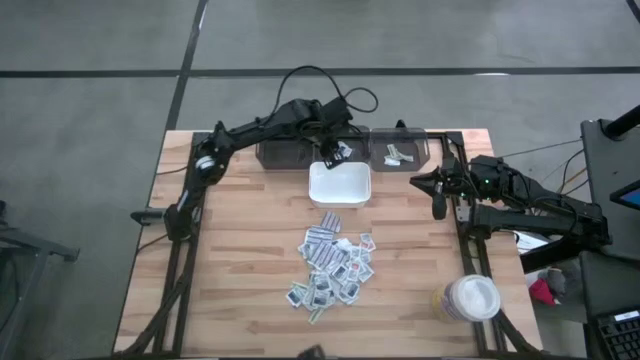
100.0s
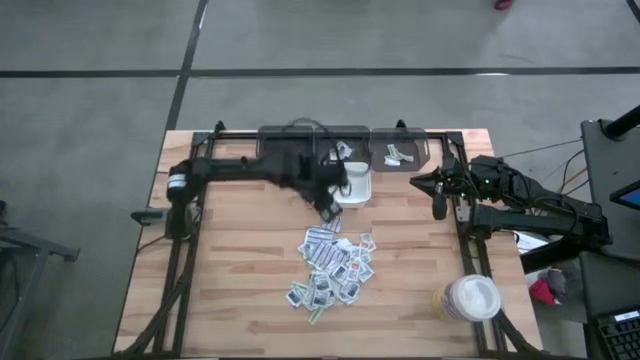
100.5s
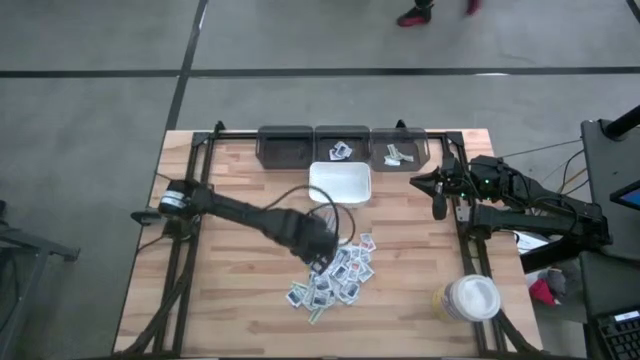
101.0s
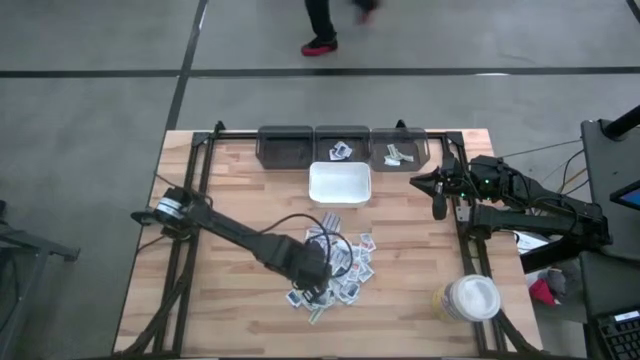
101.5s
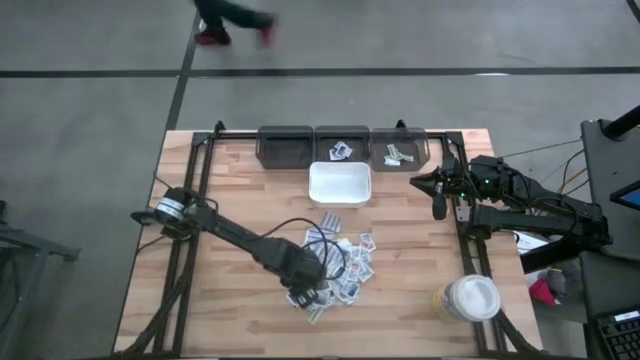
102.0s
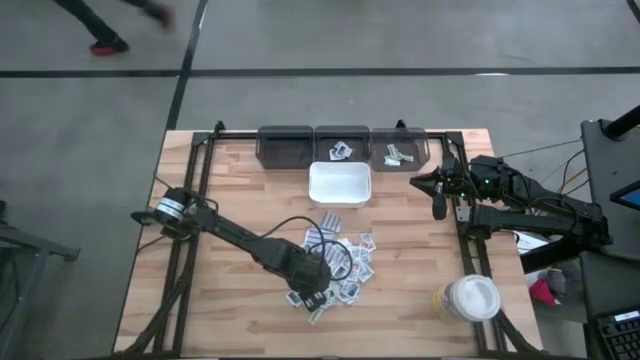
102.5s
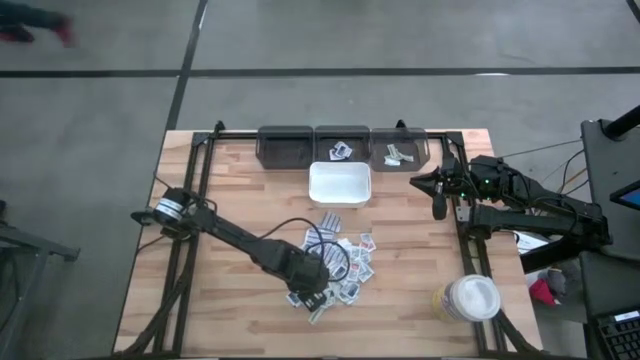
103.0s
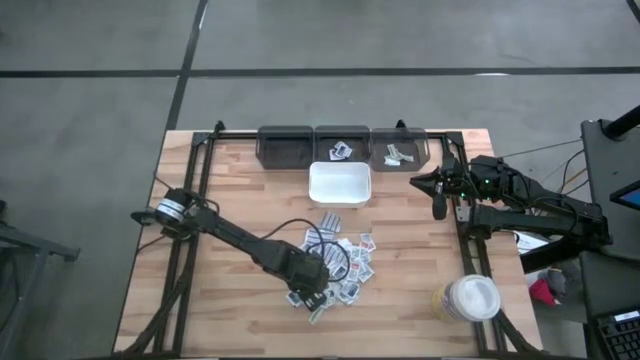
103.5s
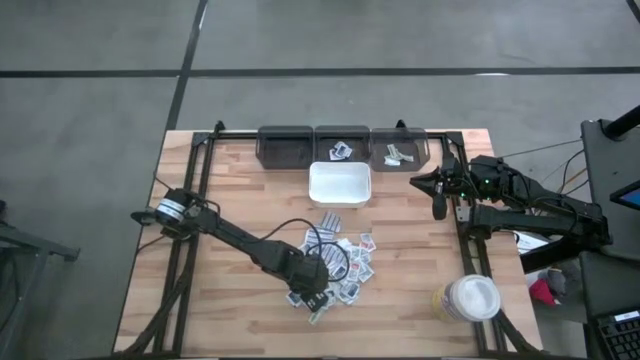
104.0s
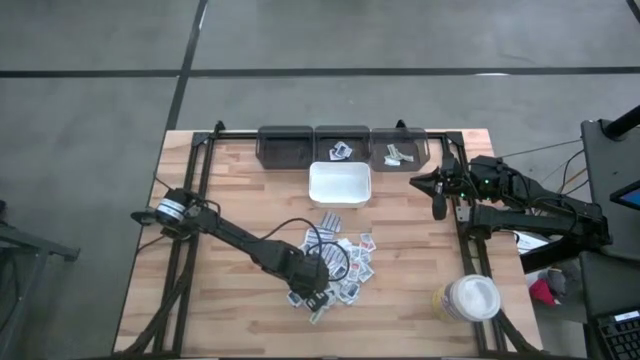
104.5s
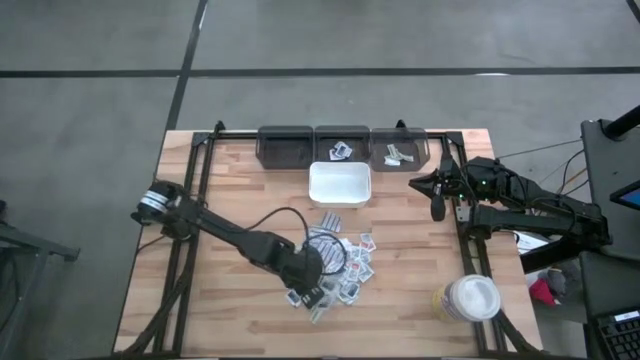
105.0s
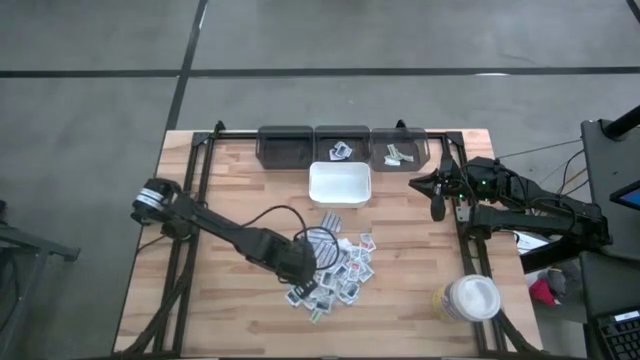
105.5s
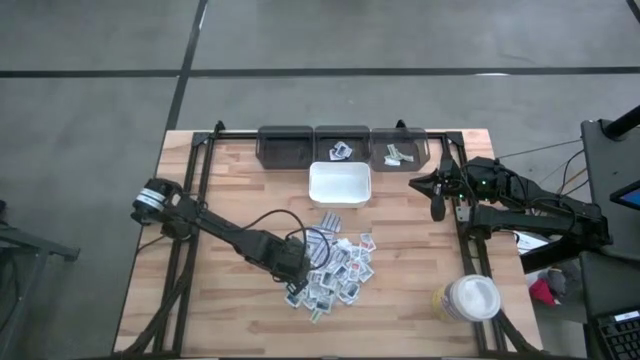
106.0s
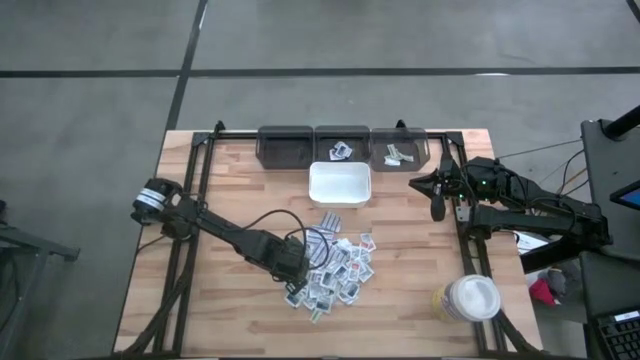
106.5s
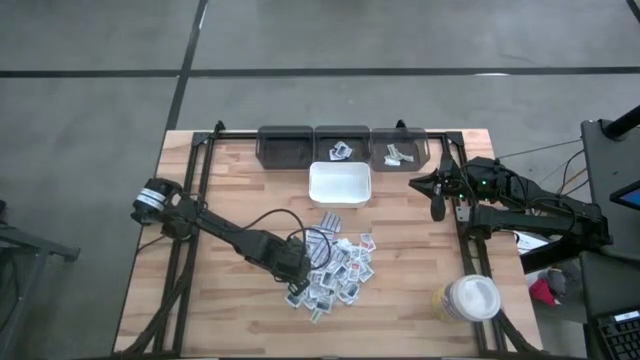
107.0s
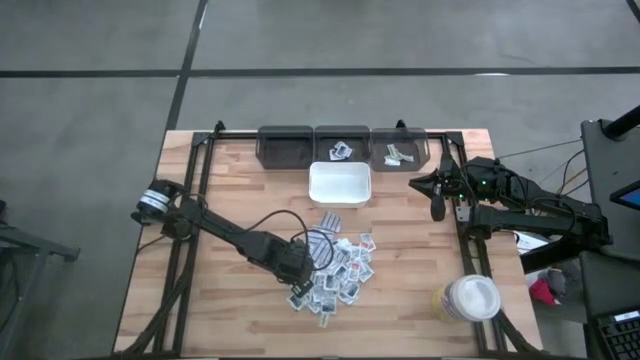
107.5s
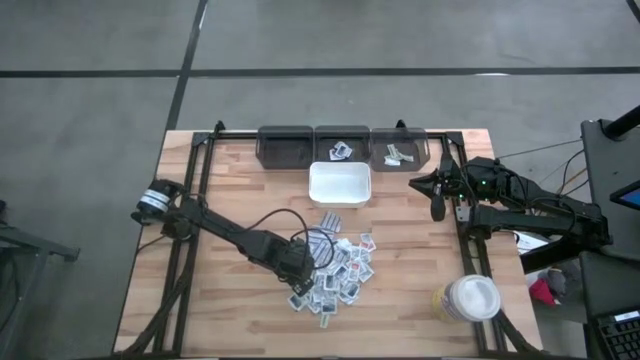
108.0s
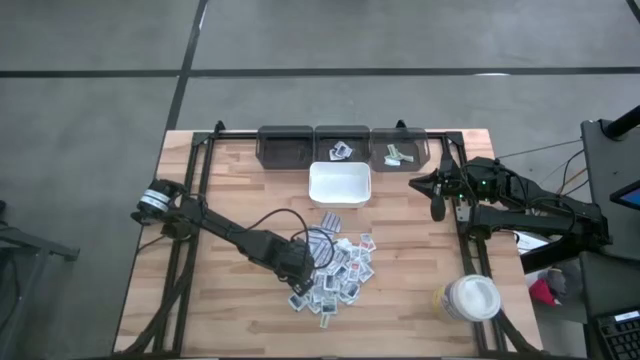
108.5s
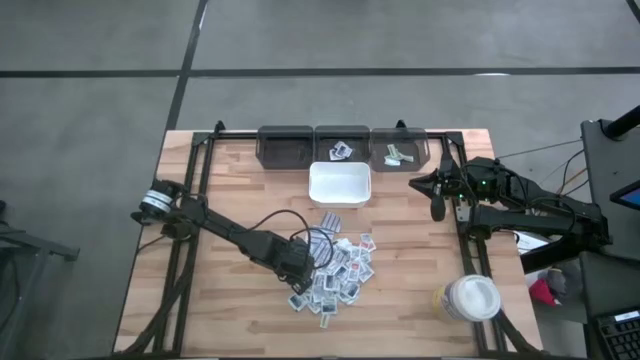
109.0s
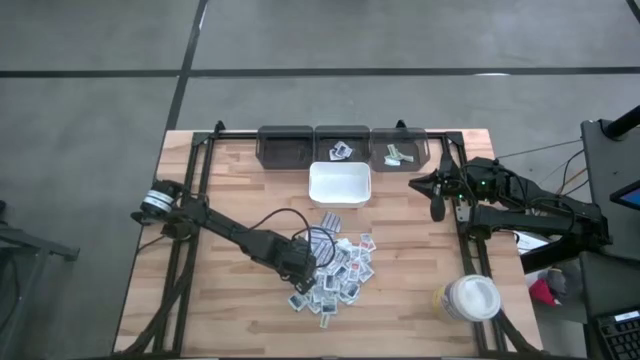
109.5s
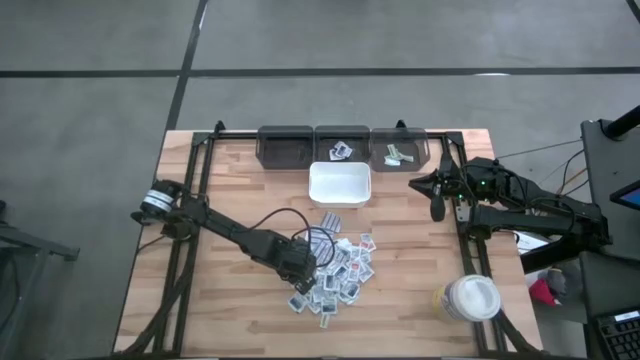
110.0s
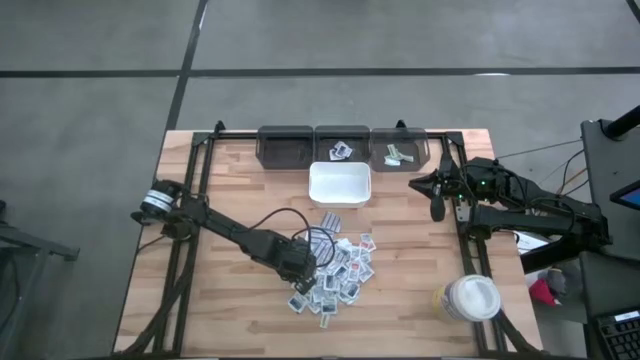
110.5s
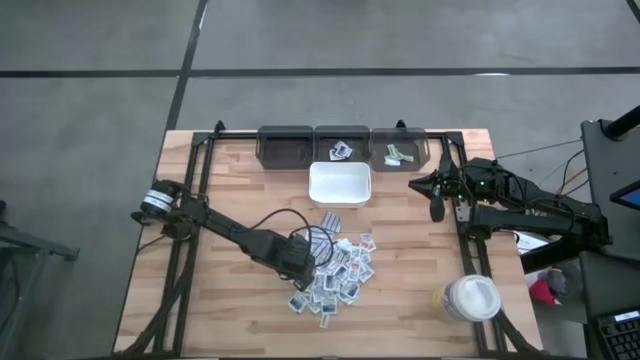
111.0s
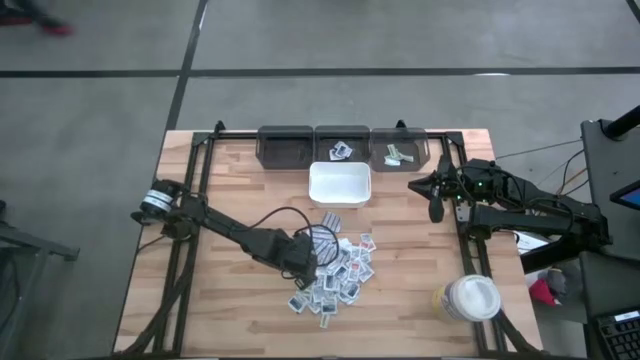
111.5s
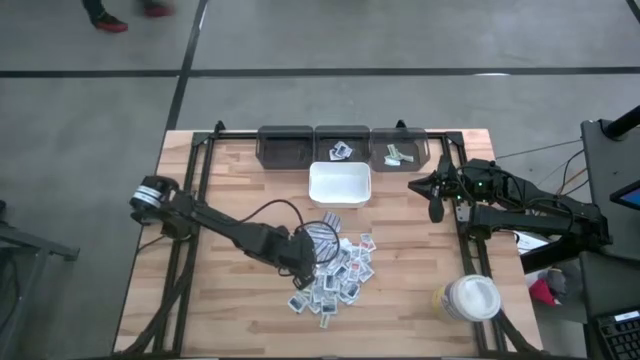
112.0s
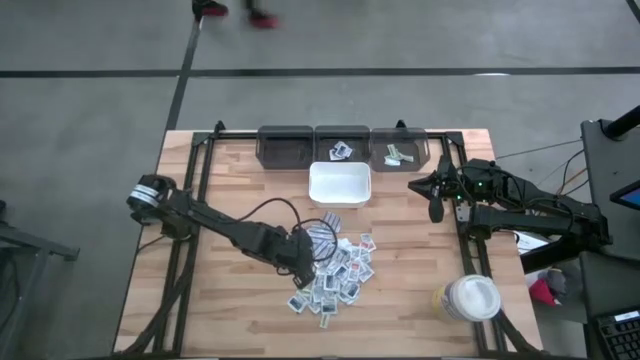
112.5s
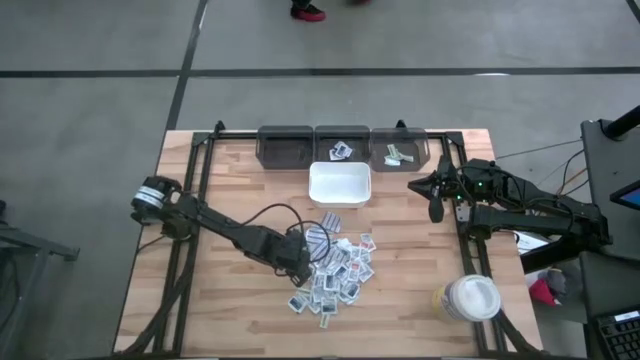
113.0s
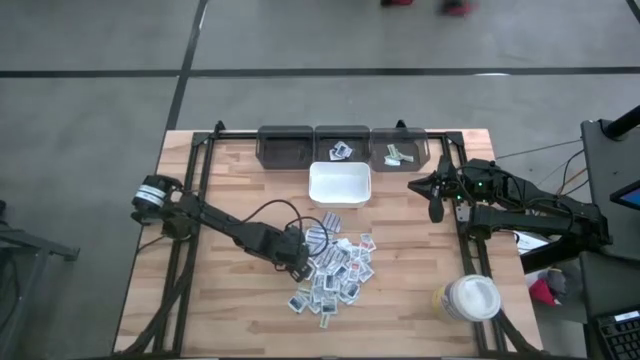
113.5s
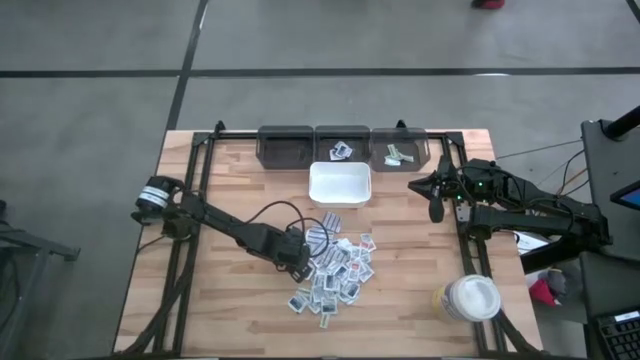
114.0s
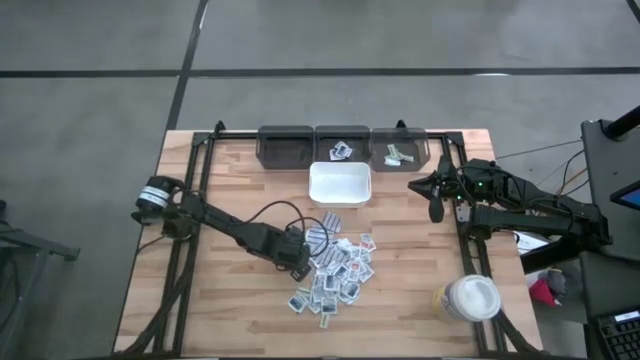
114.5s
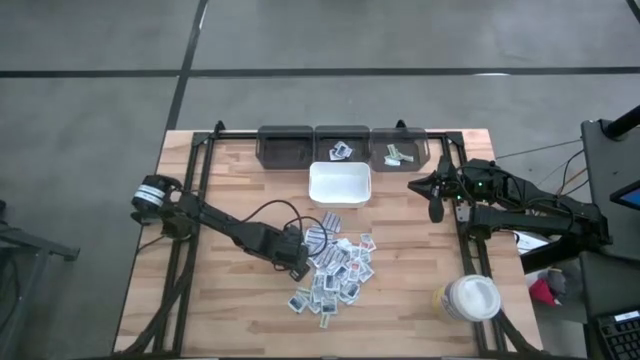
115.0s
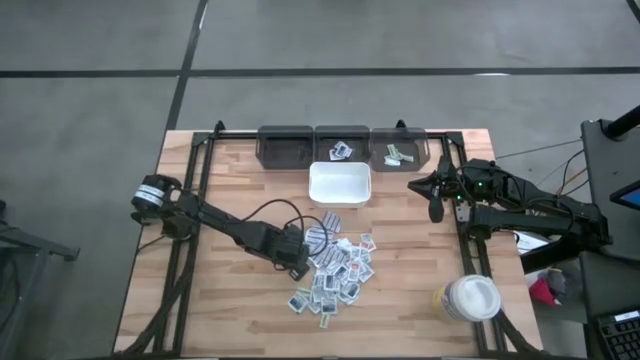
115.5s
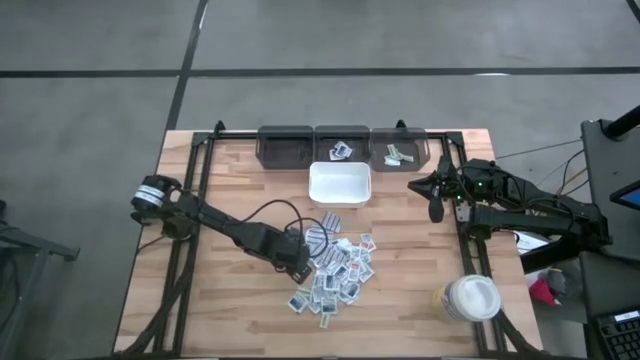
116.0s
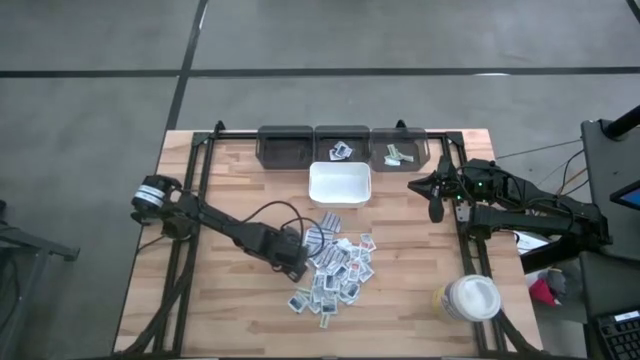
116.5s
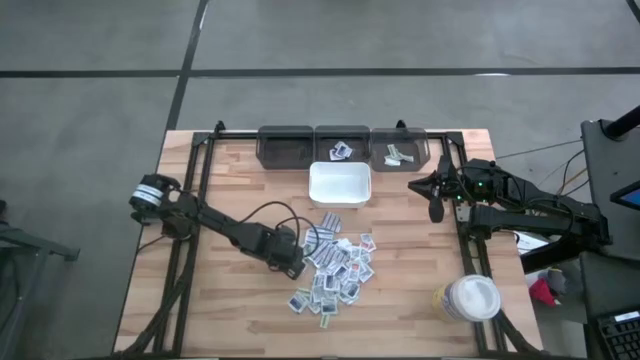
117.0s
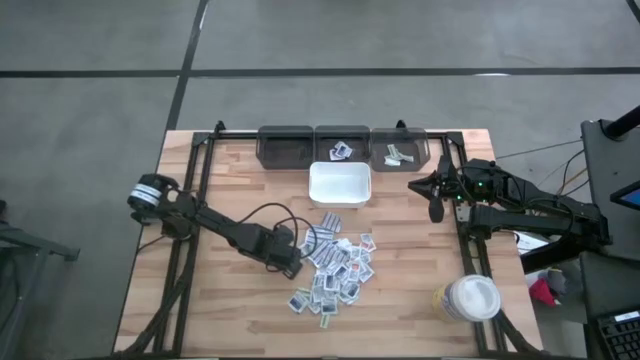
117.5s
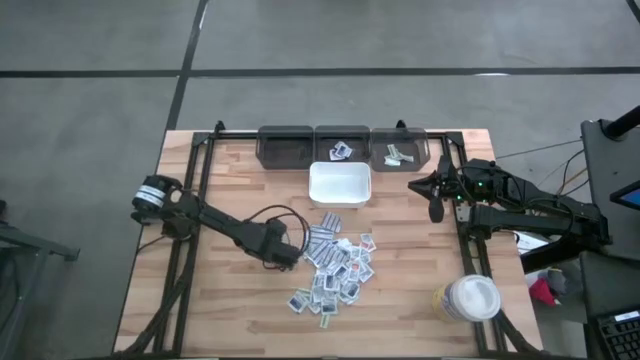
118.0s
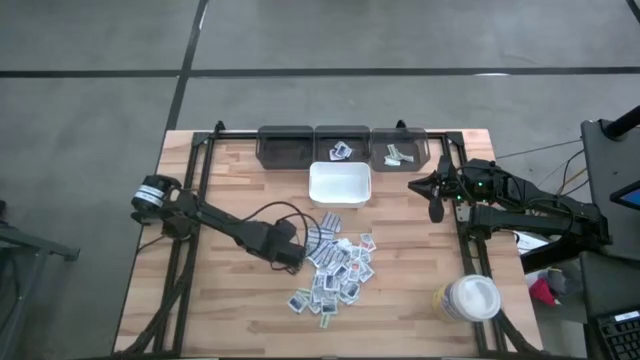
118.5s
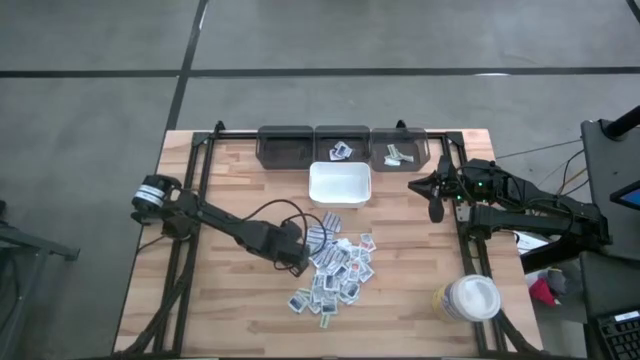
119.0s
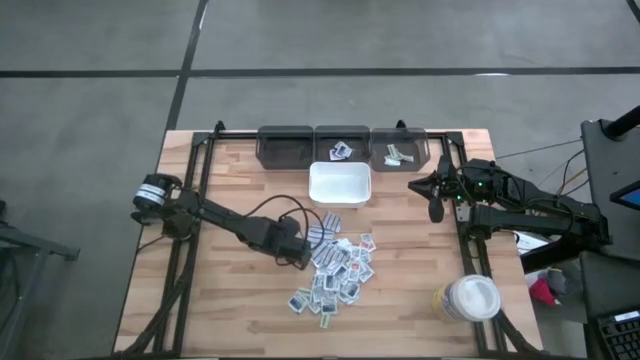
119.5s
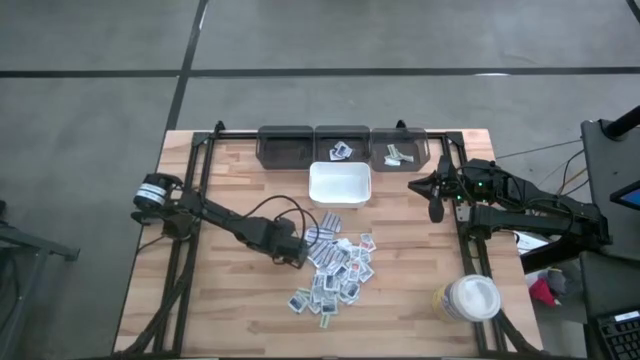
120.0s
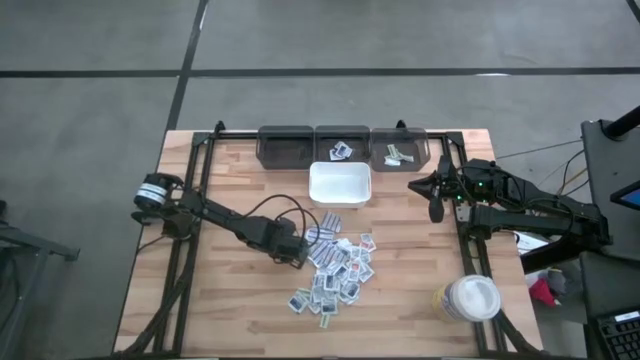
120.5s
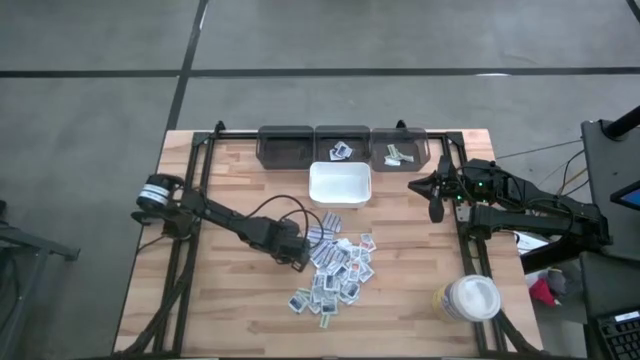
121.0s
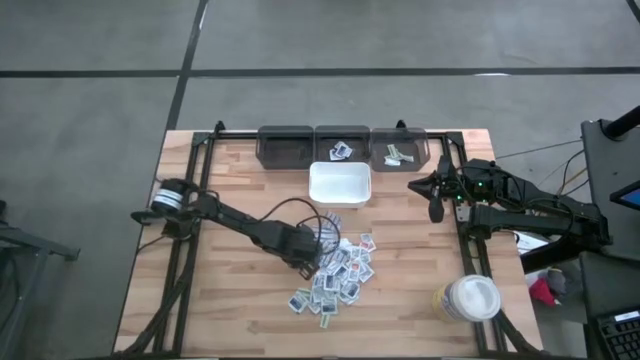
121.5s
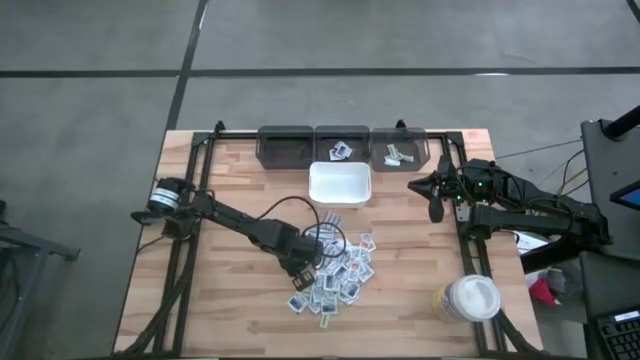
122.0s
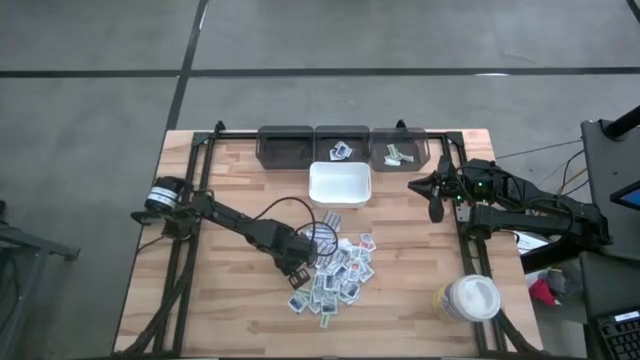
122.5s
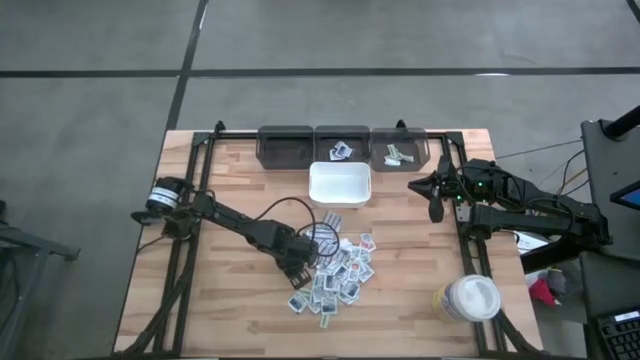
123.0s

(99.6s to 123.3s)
Task: Pick & Place First Aid Supplies
Put the blue alcohol pad into the middle gray bin
